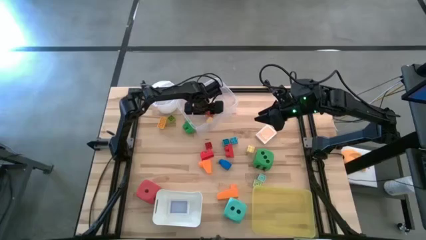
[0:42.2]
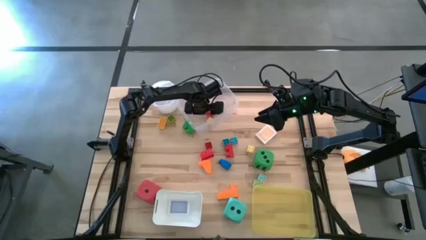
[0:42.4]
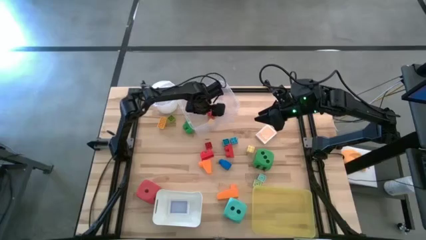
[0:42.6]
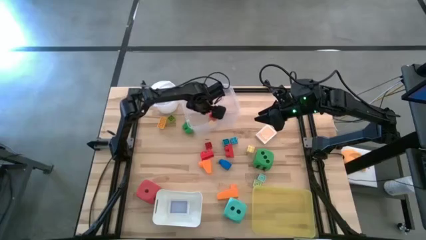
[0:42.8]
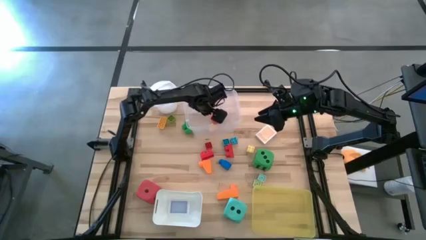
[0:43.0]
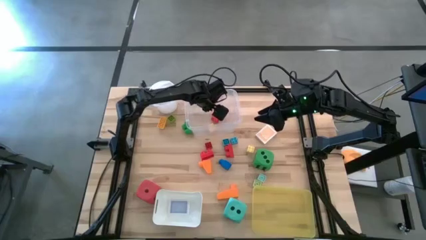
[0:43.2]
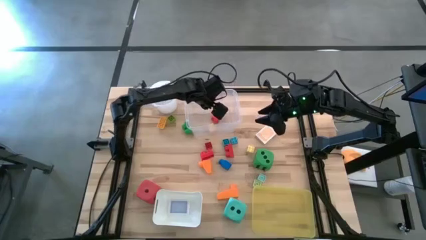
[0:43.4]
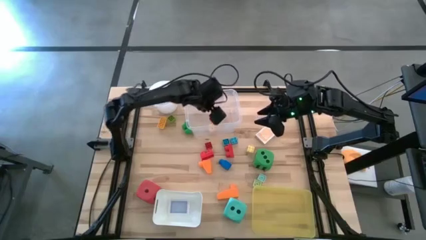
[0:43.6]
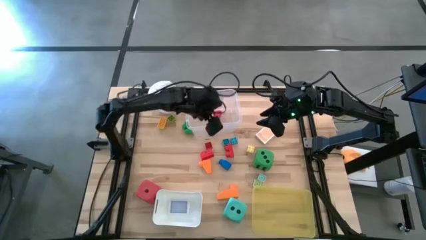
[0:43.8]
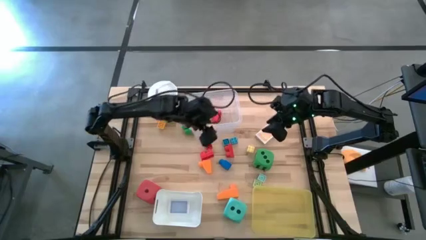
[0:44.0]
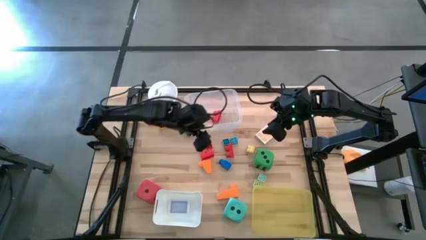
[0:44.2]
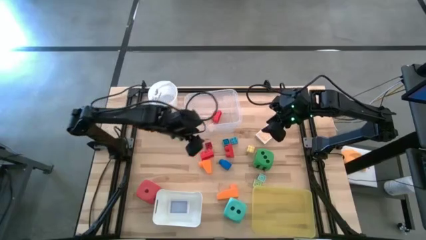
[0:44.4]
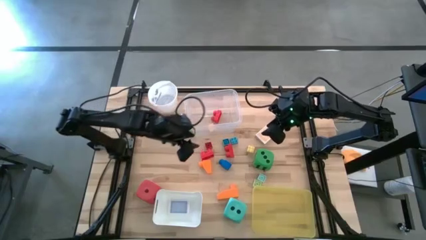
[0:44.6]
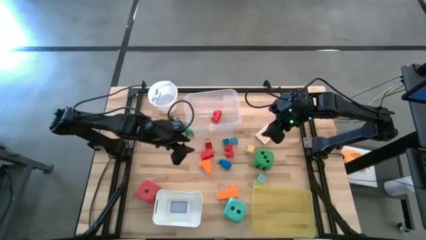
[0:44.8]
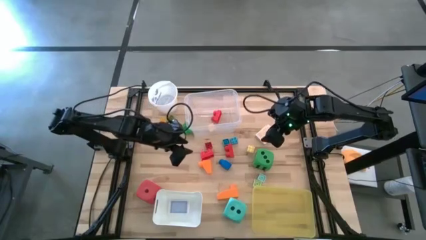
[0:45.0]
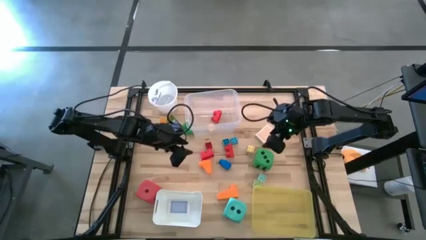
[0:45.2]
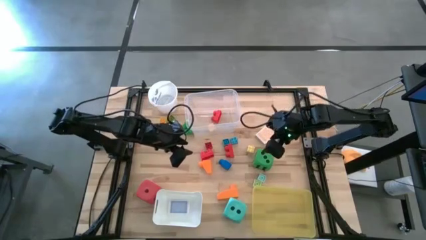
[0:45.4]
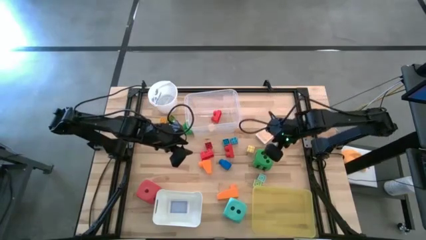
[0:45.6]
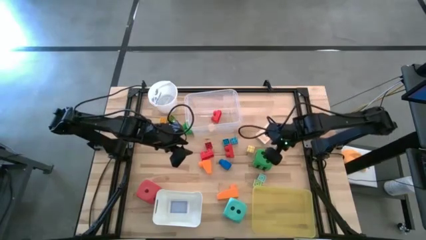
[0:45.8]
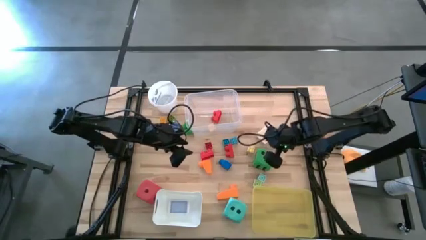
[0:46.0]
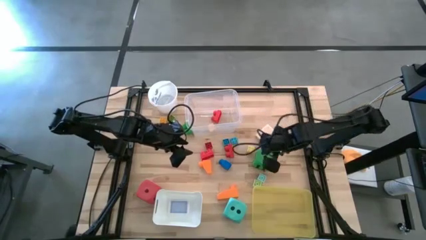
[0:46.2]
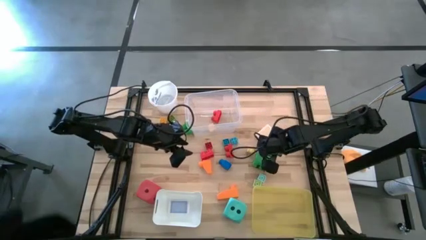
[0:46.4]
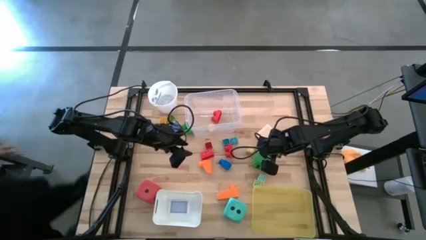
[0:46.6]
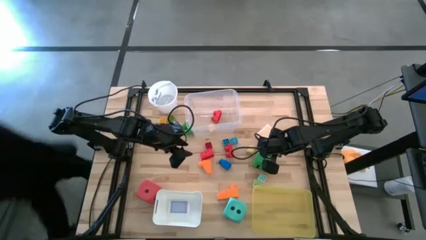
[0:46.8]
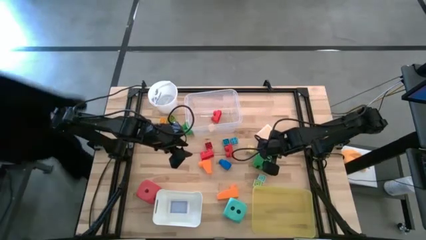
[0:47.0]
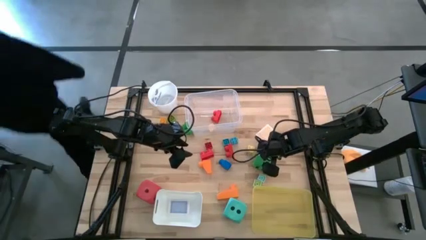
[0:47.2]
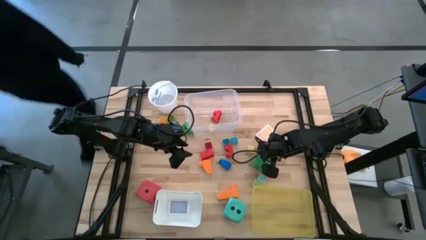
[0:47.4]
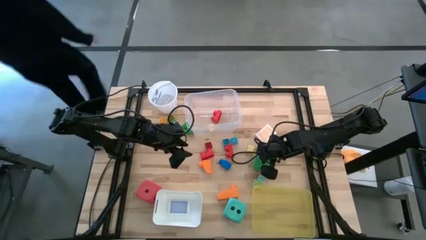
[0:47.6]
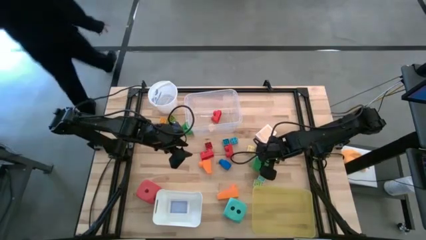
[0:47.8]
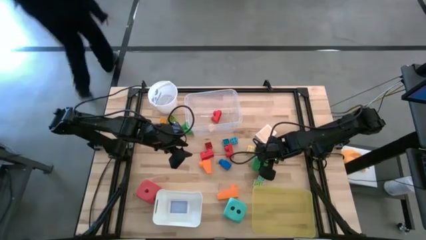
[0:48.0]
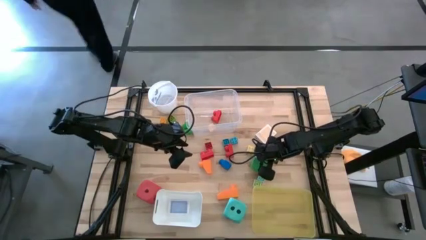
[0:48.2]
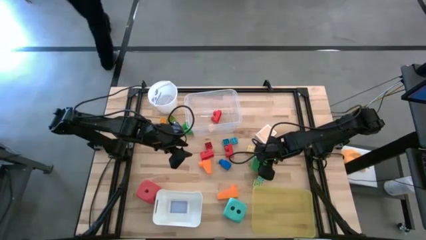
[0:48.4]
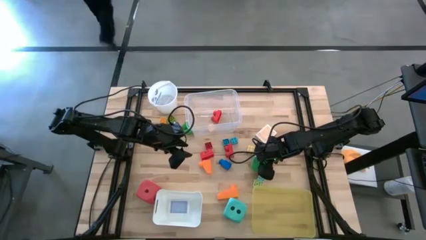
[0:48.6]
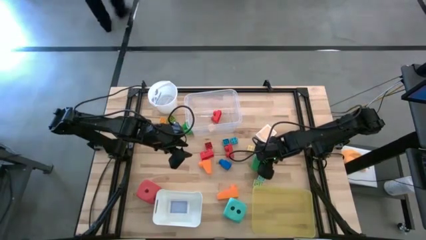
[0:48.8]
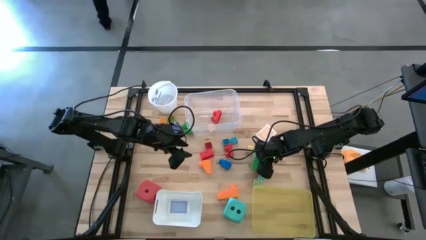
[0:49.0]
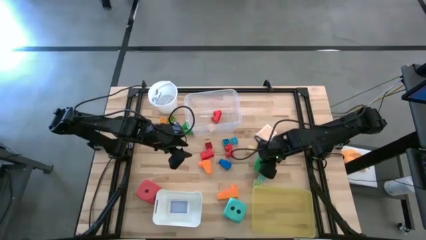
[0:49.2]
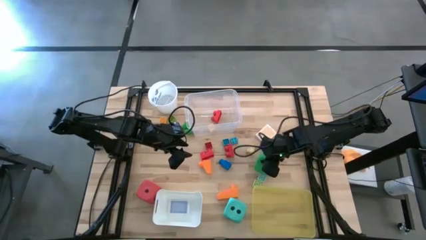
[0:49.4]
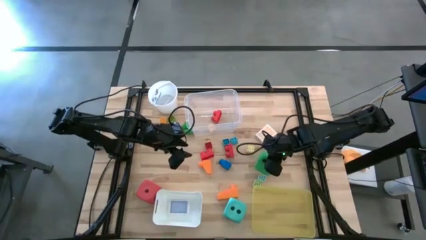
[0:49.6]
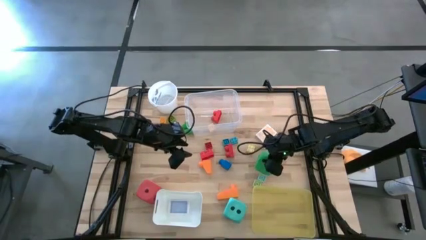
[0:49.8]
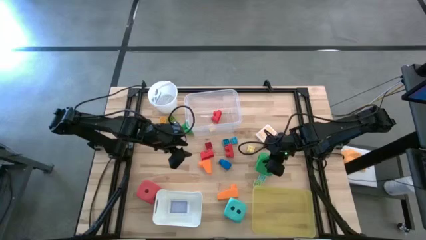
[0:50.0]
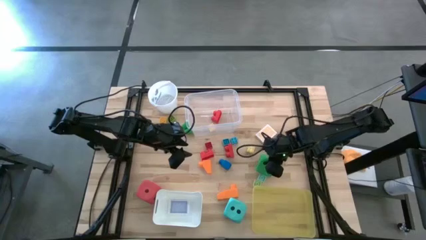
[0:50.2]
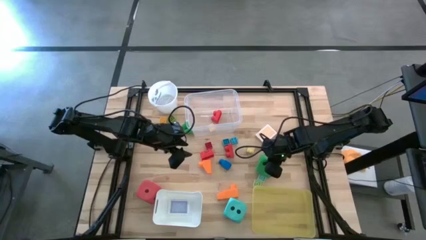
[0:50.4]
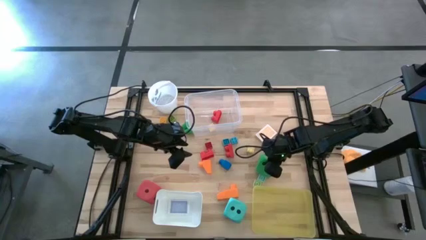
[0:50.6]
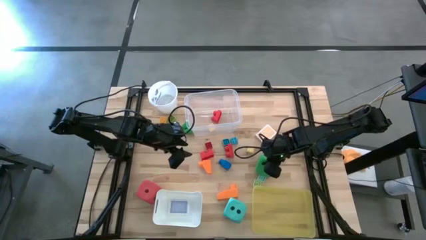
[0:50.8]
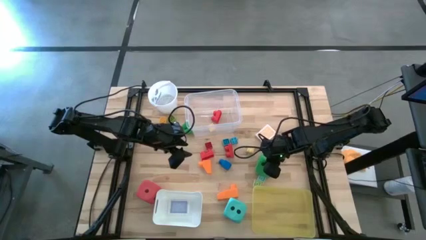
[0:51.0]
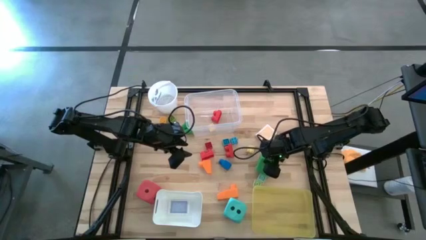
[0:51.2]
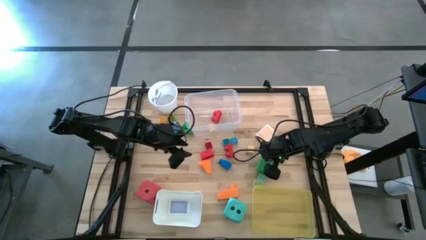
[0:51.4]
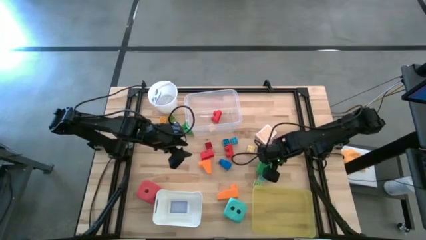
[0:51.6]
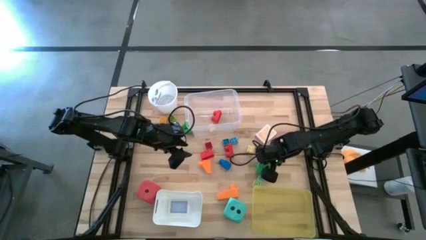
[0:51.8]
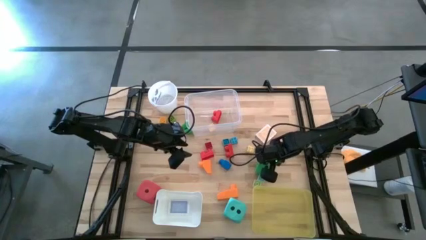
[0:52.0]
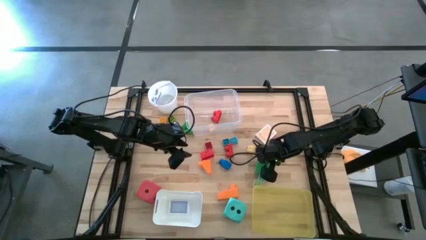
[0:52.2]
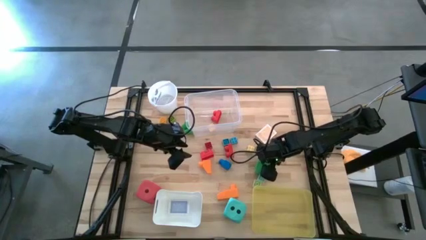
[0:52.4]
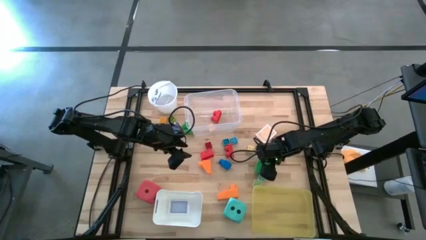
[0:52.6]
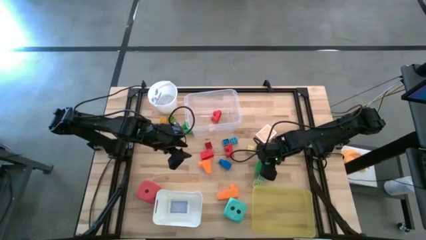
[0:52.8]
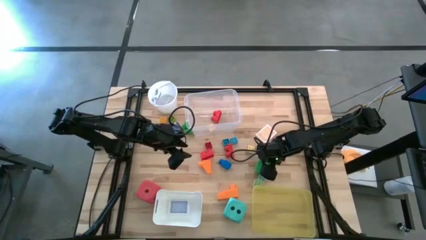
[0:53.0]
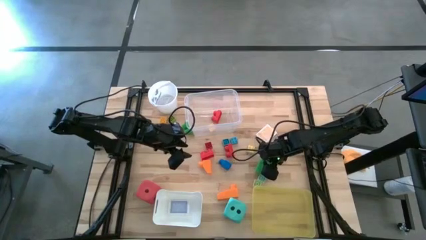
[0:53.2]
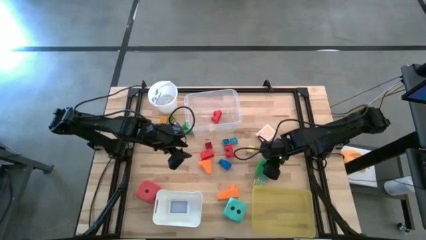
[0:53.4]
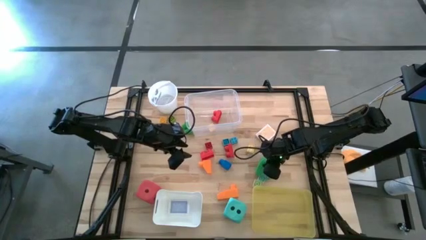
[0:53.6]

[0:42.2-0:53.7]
Task: Pick & Place Toys
Put the green dice into the yellow bin

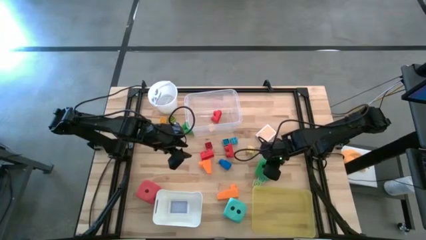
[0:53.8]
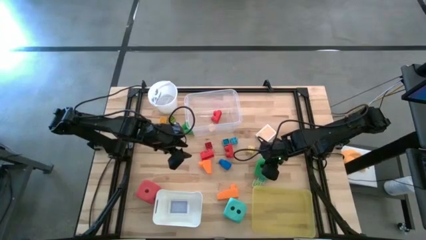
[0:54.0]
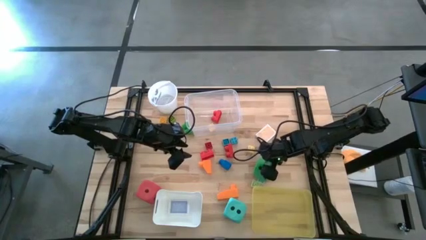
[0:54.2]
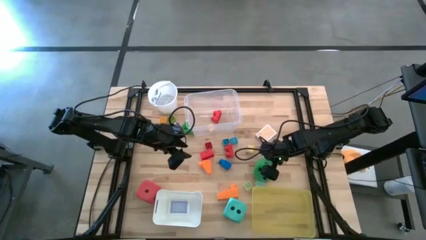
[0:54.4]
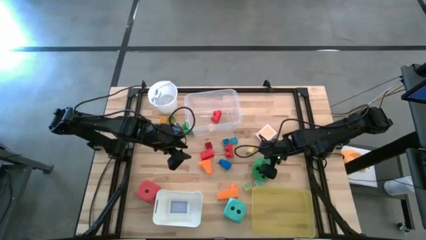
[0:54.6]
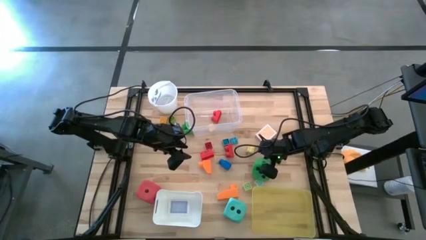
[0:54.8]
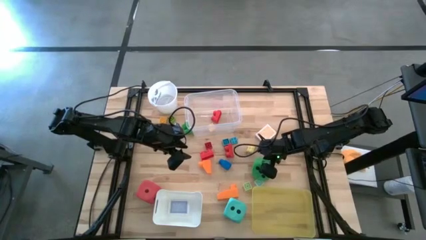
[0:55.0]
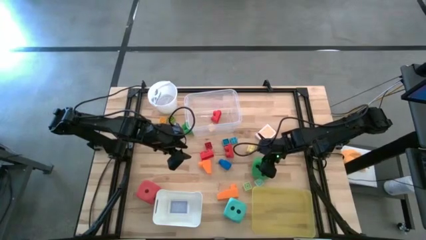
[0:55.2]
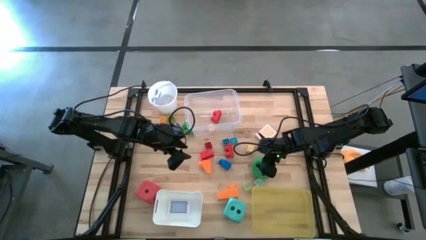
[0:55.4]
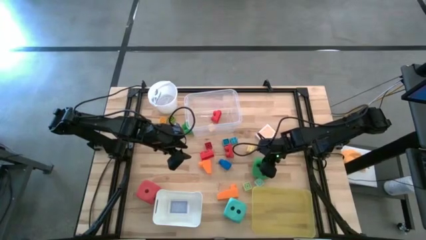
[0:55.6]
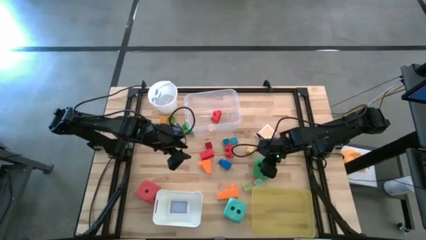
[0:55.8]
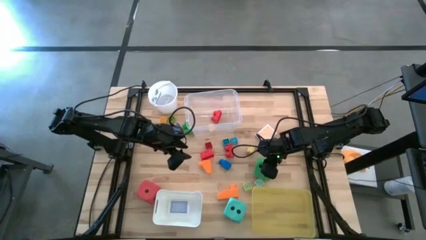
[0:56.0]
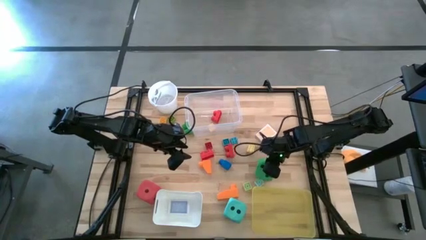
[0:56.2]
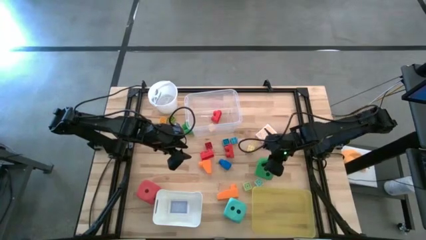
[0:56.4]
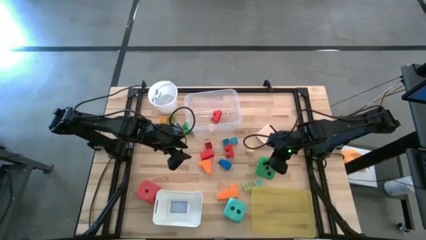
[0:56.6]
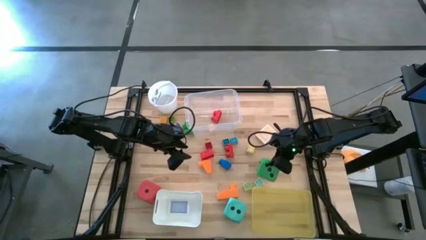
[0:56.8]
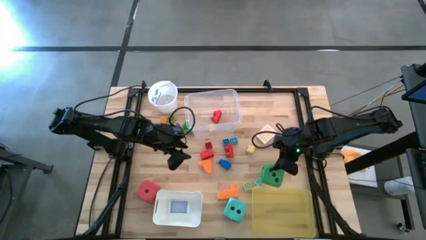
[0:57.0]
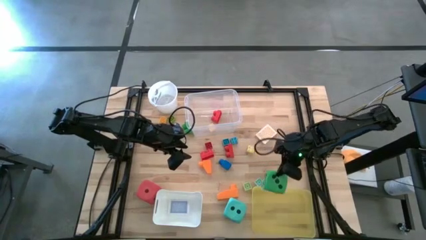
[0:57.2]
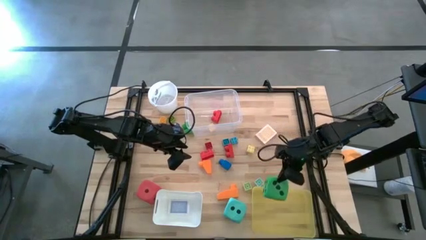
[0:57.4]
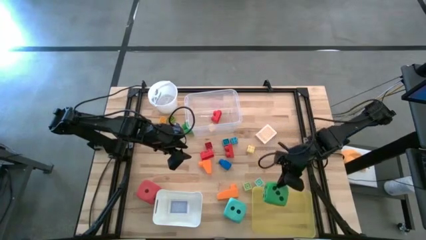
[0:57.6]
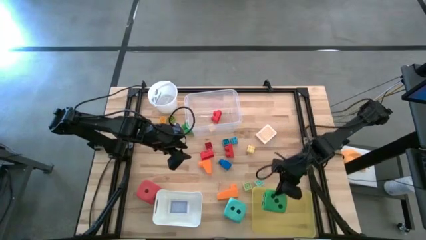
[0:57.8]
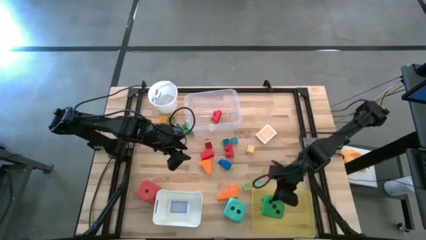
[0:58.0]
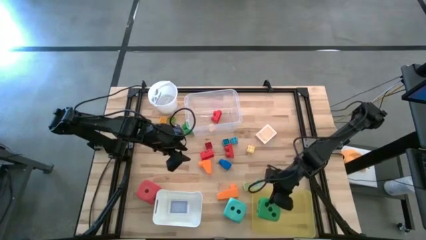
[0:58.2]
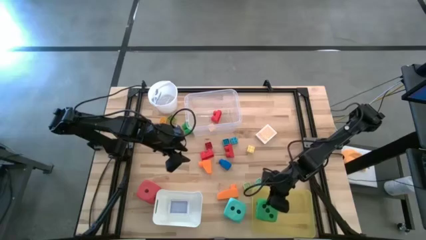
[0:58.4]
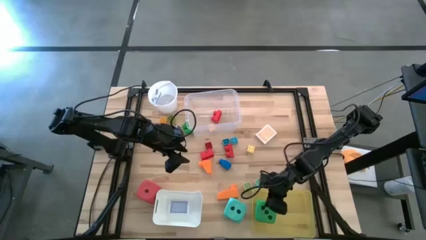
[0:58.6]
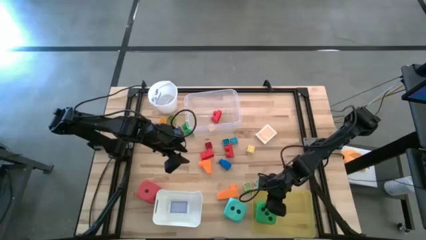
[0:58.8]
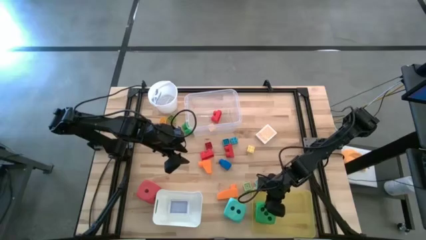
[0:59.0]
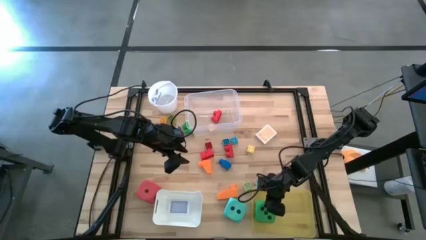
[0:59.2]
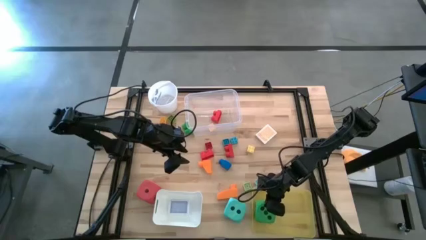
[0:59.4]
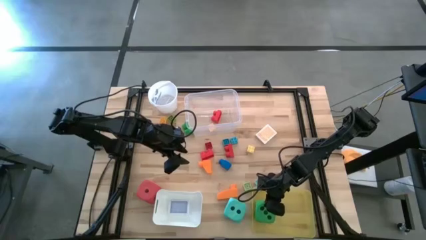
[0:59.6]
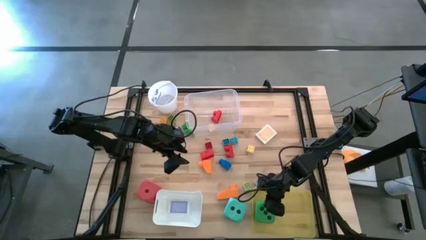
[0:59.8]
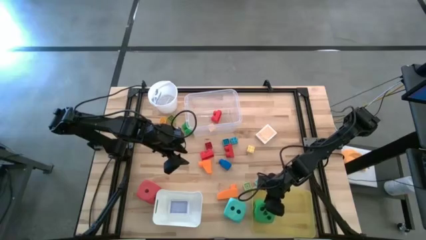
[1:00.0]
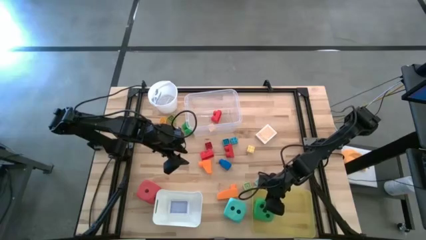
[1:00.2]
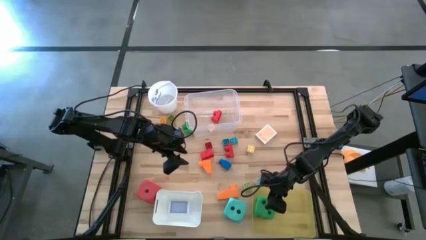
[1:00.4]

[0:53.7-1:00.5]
Put the green dice into the yellow bin
